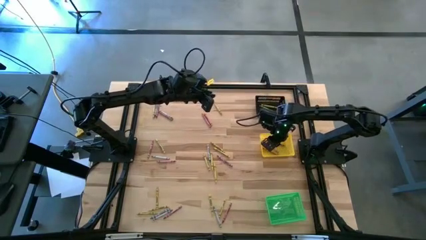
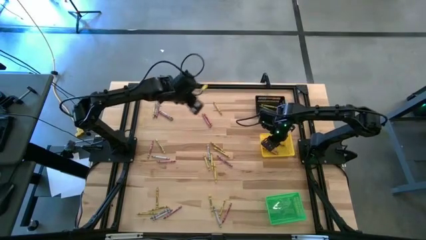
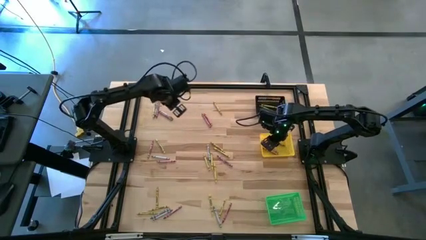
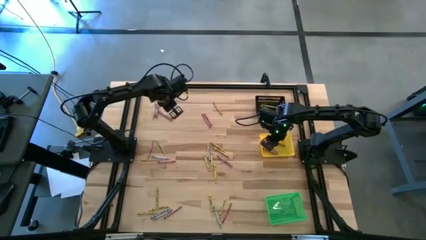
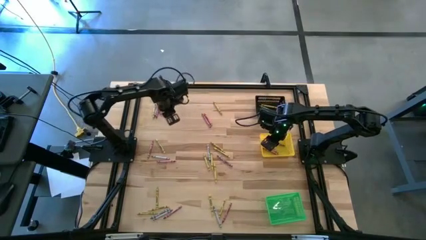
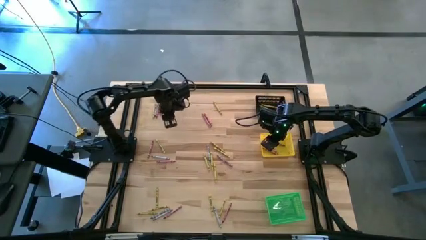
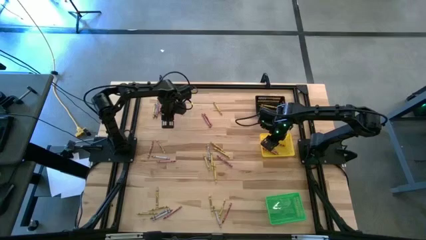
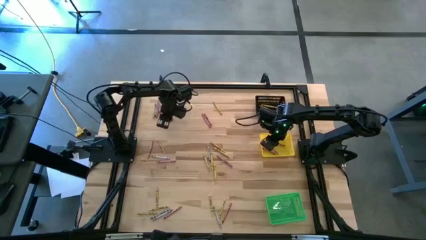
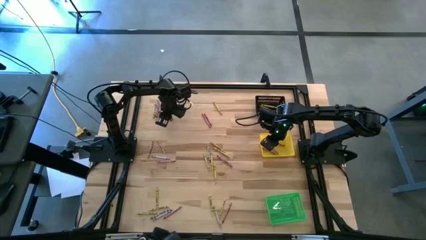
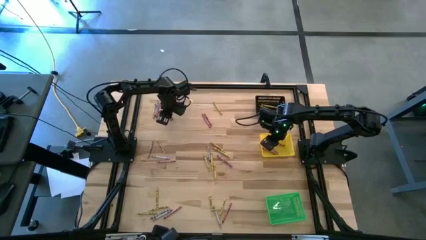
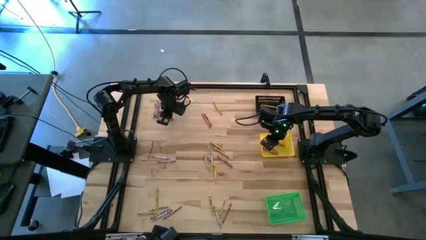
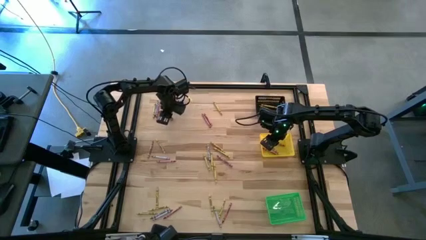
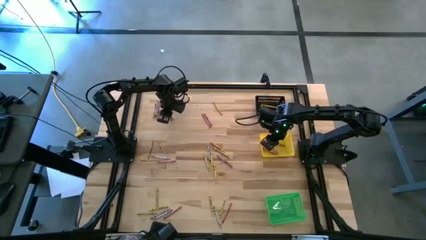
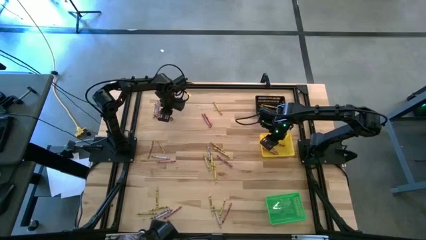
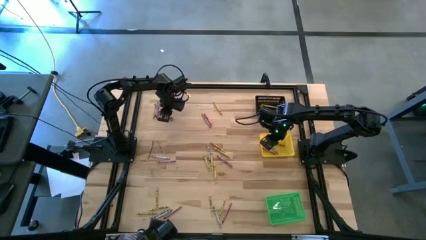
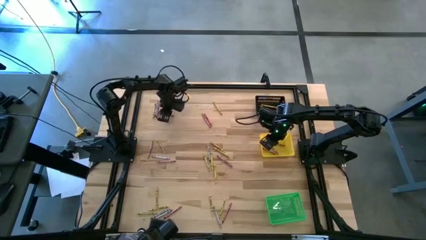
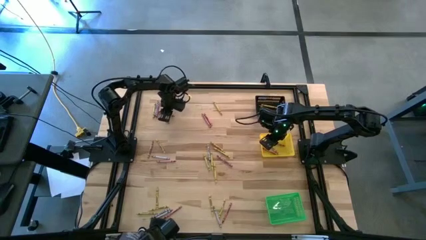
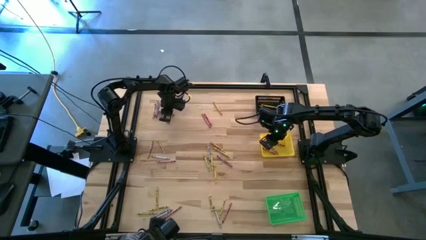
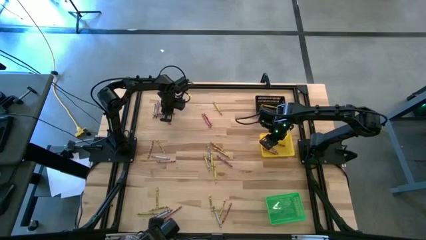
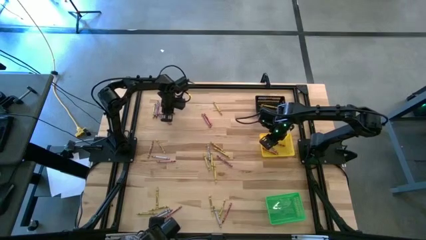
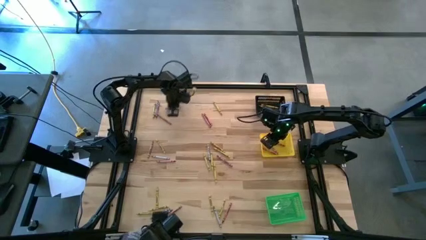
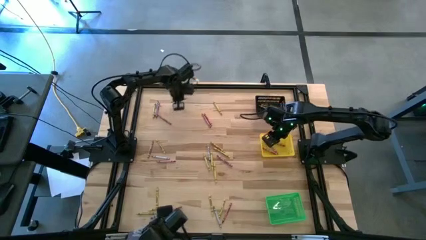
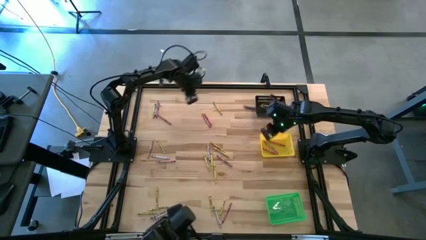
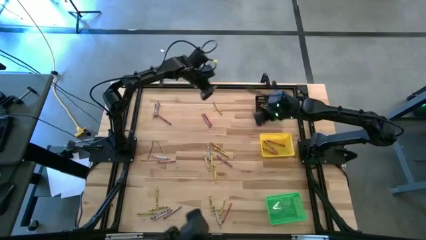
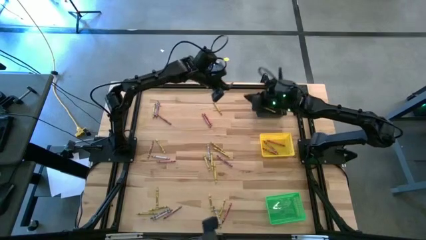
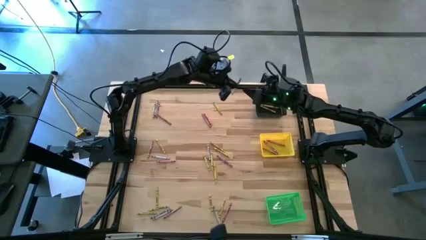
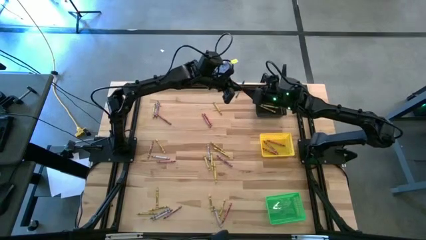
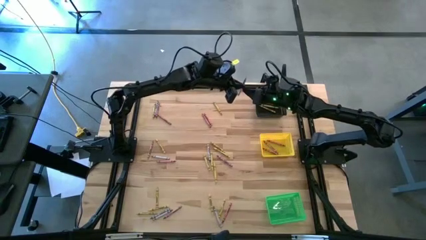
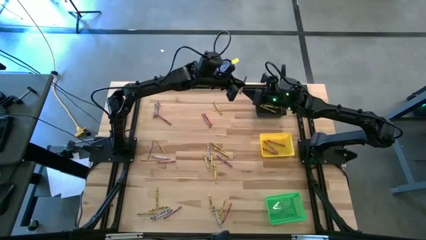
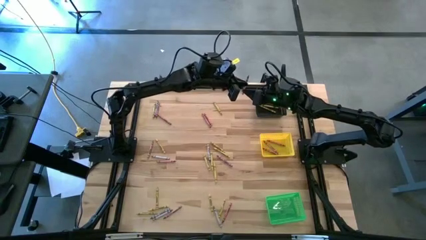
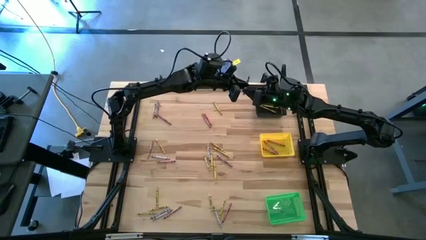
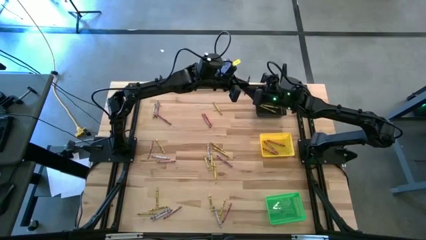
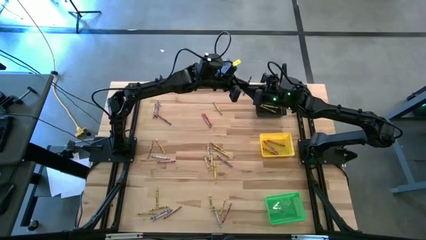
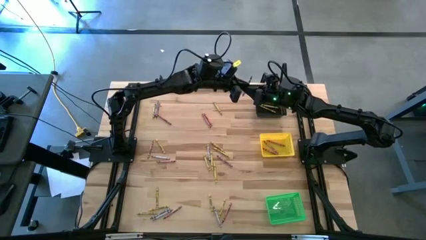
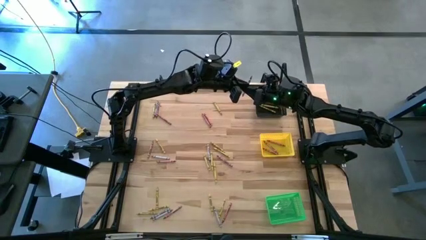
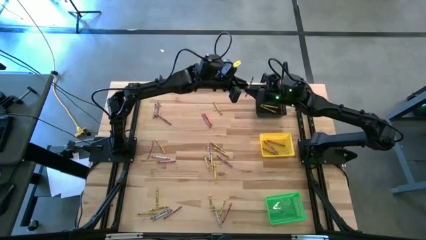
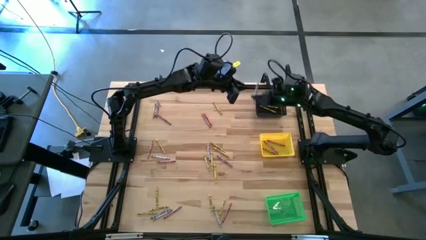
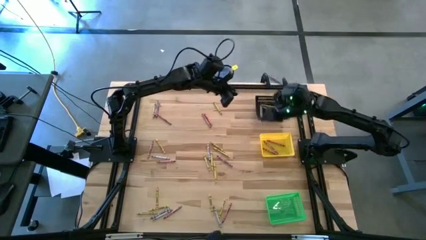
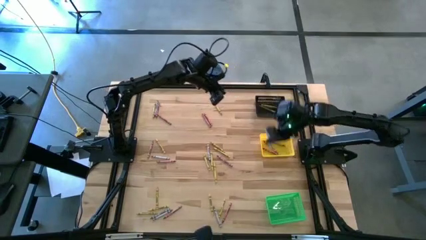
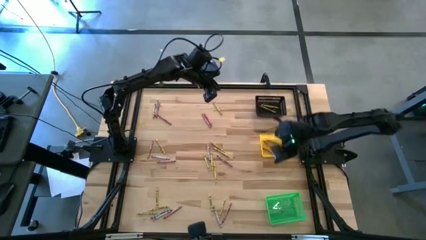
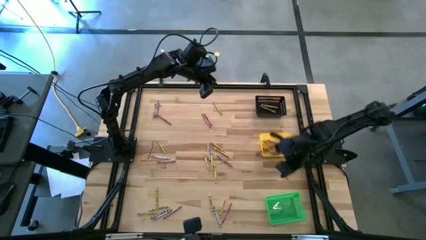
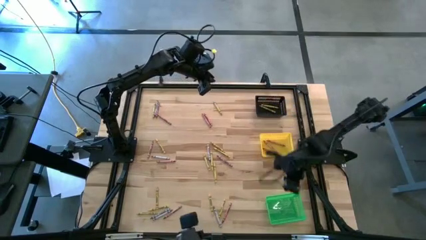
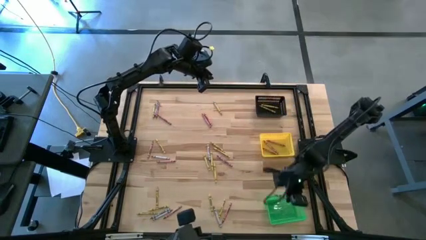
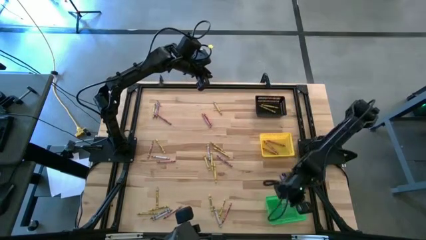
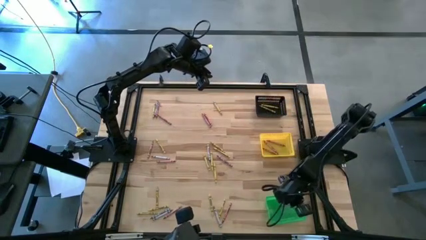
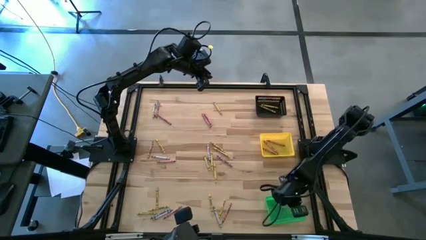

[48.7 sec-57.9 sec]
Task: Sort crayons
Put the gray crayon into the green bin

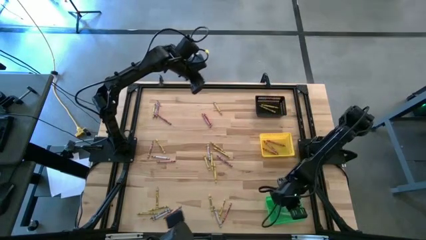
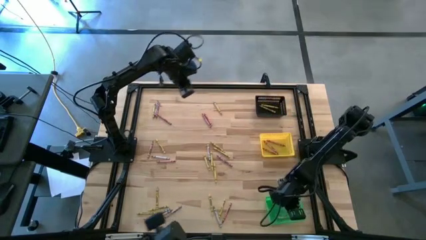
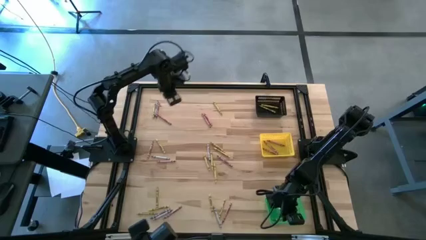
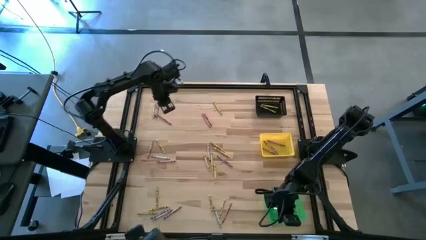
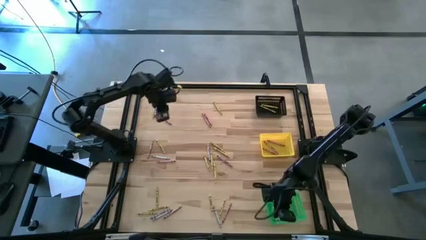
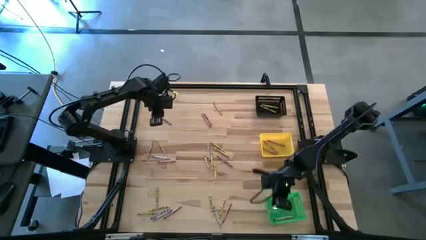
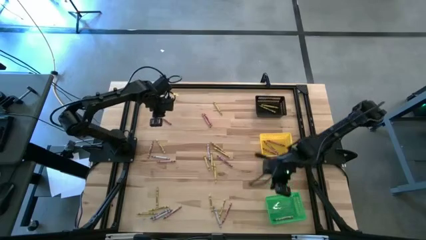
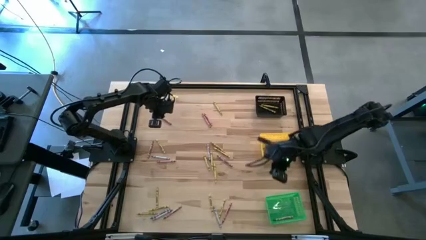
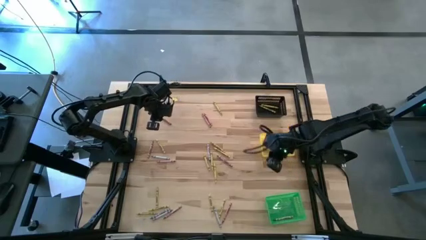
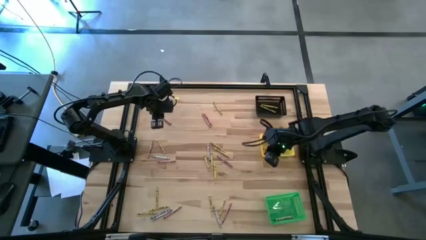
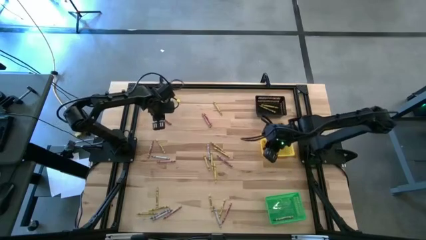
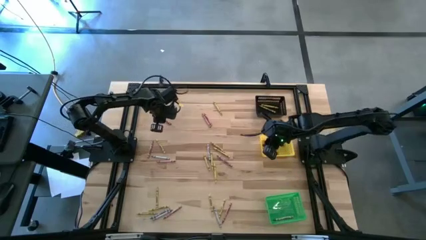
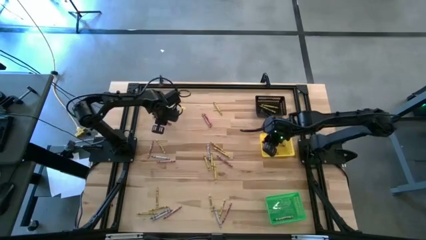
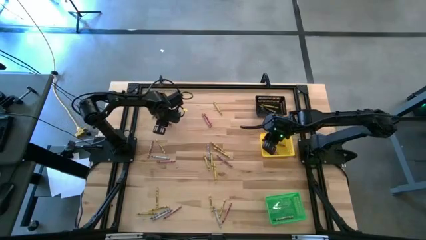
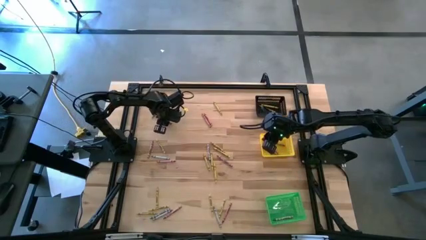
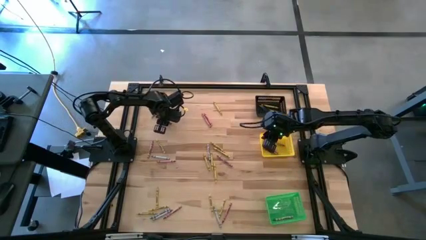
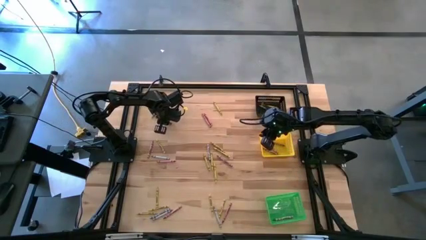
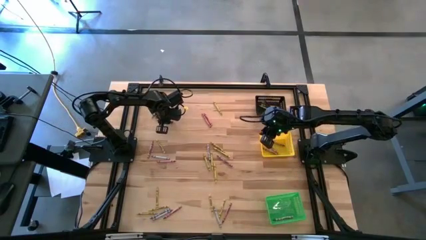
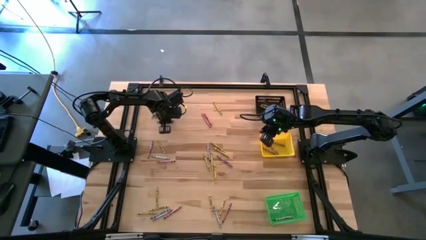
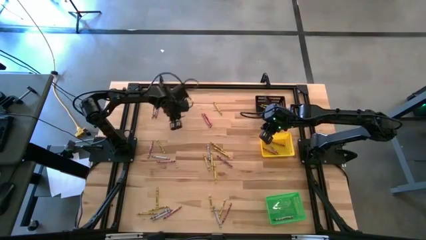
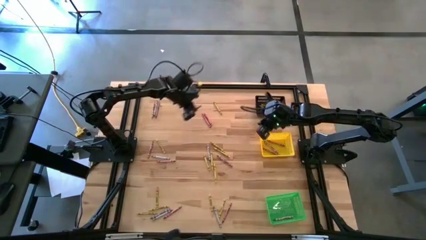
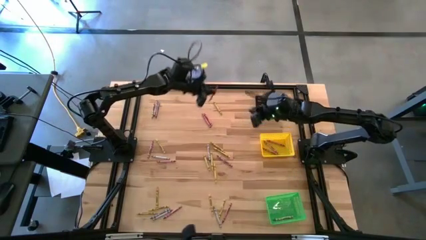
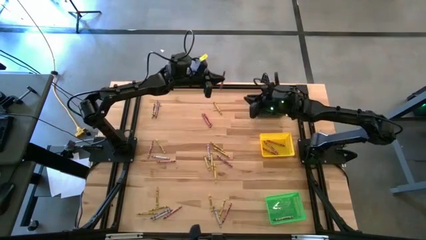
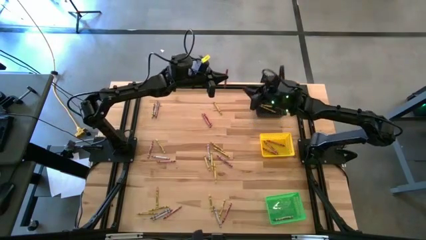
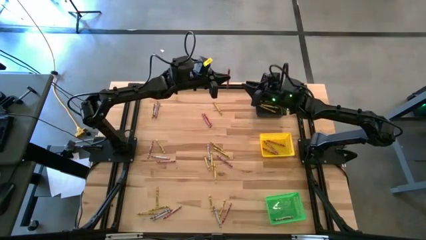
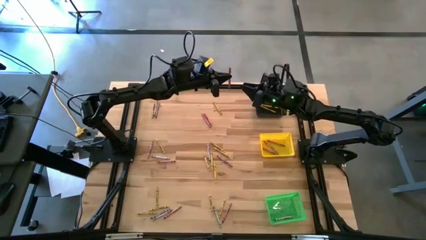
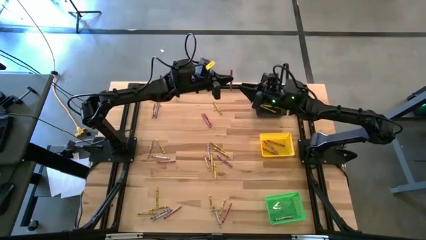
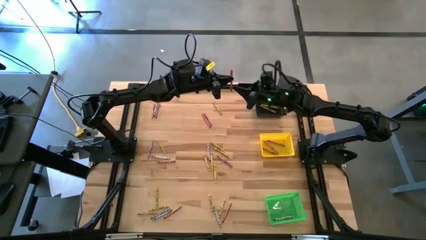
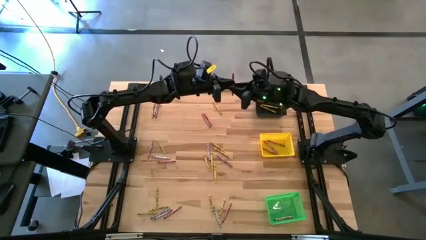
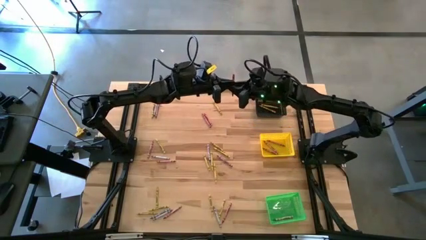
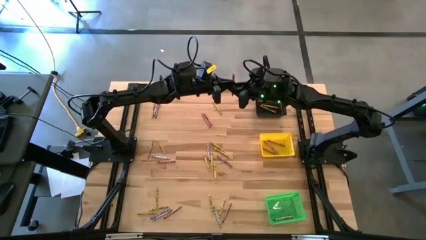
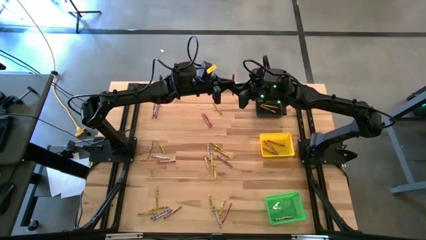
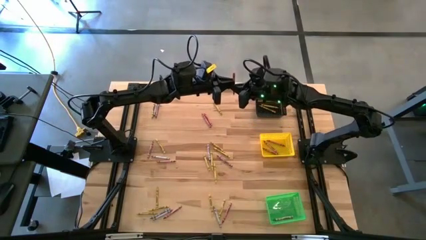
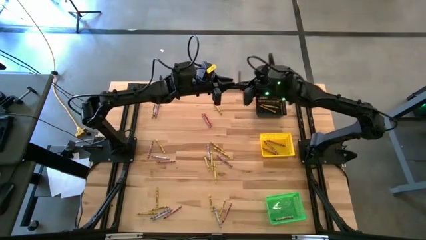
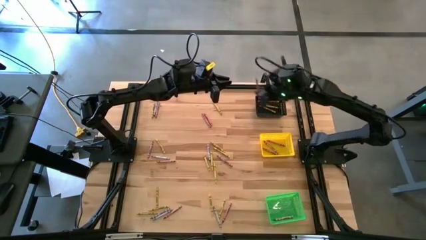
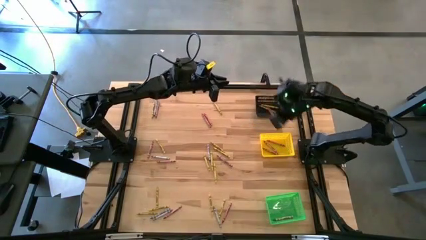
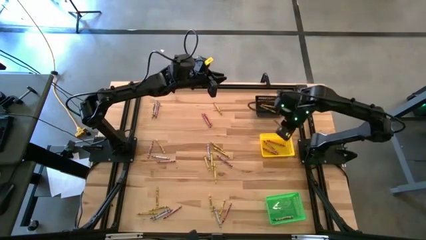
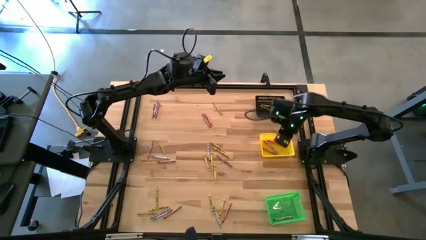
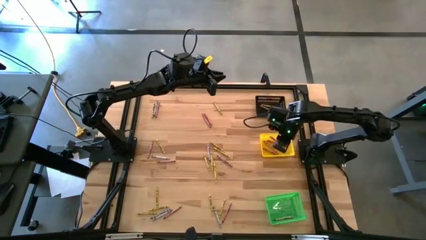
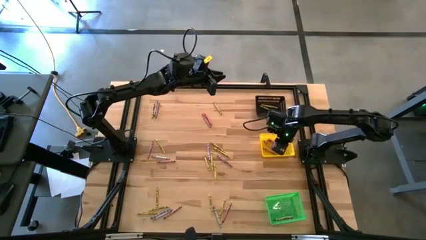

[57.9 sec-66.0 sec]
Put the red crayon into the yellow bin
